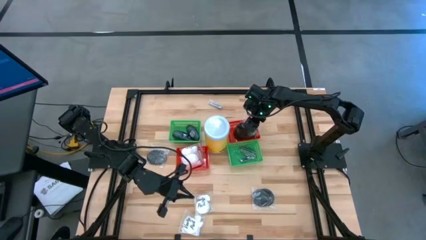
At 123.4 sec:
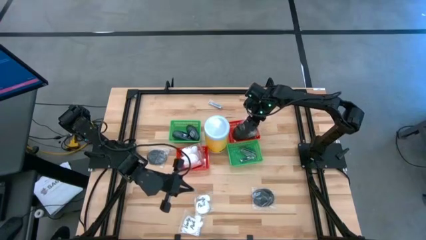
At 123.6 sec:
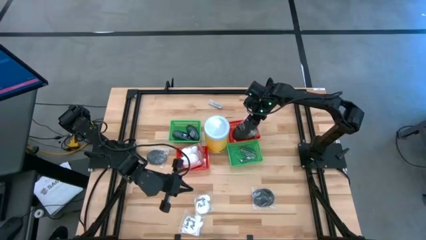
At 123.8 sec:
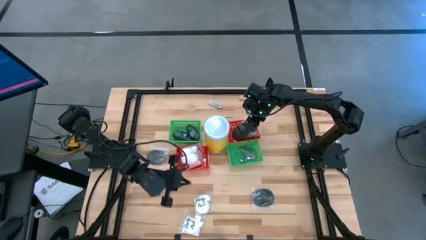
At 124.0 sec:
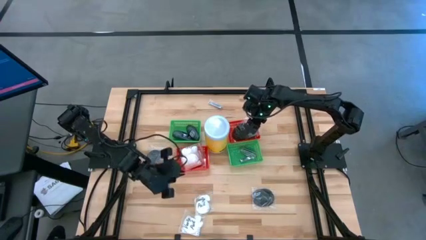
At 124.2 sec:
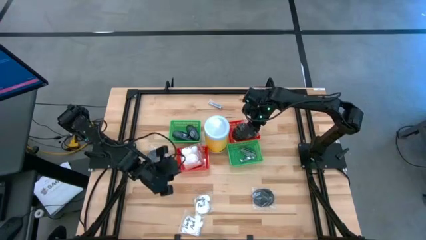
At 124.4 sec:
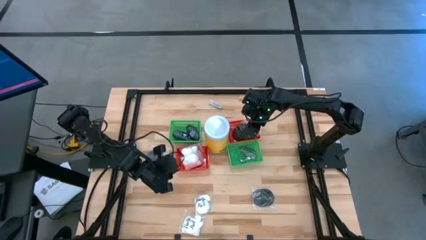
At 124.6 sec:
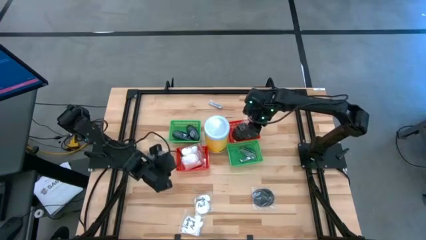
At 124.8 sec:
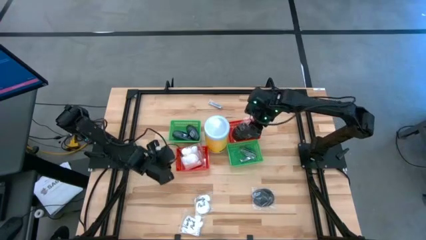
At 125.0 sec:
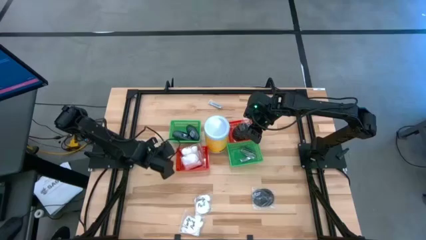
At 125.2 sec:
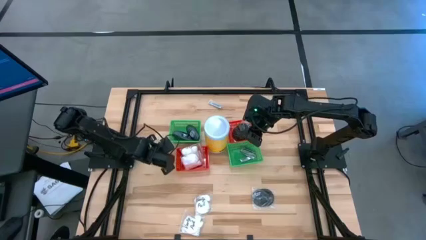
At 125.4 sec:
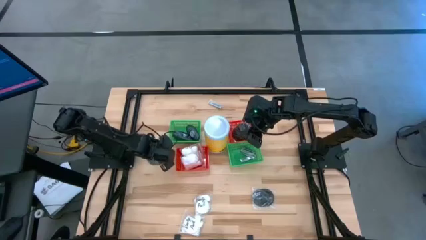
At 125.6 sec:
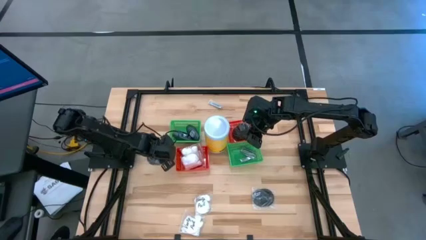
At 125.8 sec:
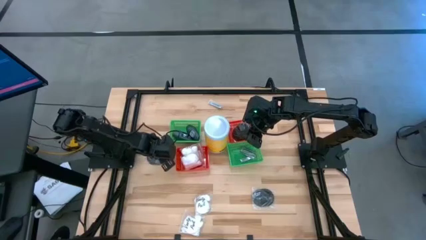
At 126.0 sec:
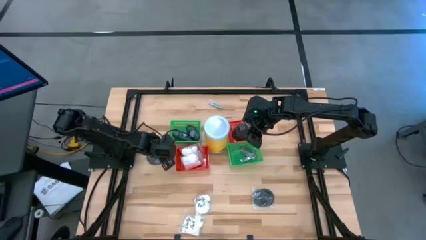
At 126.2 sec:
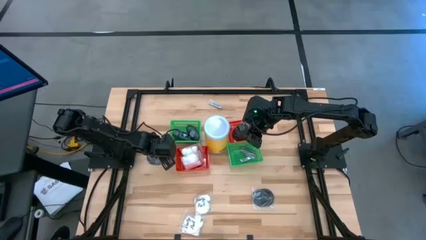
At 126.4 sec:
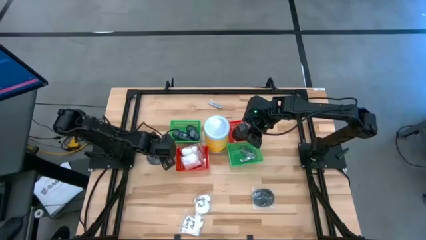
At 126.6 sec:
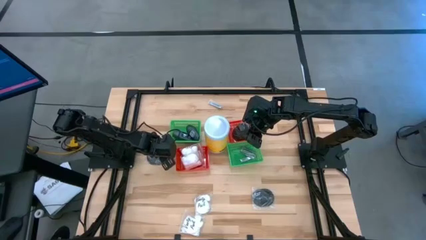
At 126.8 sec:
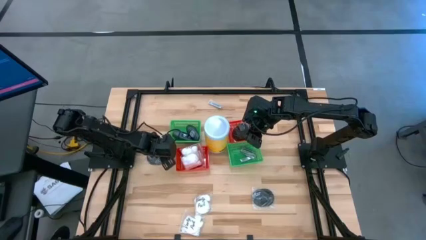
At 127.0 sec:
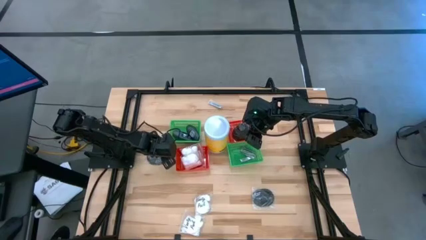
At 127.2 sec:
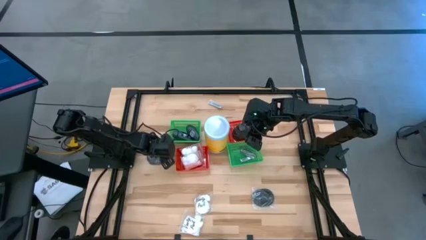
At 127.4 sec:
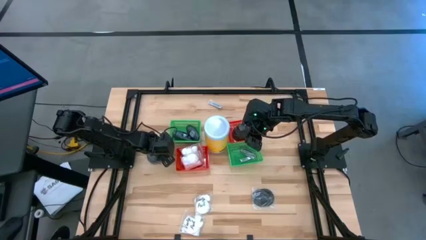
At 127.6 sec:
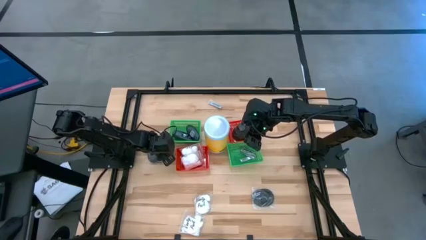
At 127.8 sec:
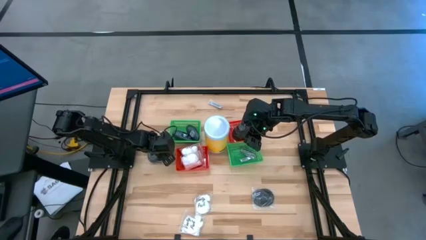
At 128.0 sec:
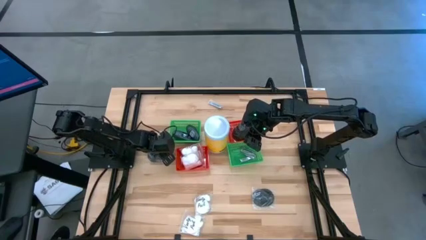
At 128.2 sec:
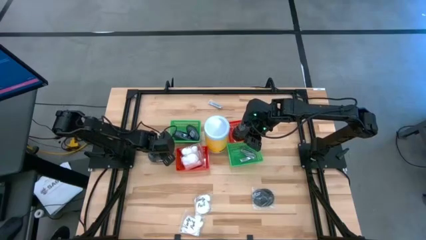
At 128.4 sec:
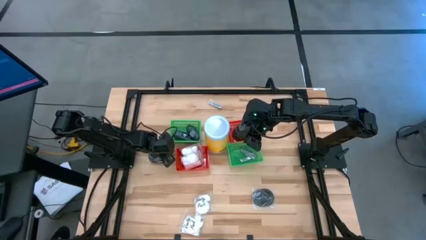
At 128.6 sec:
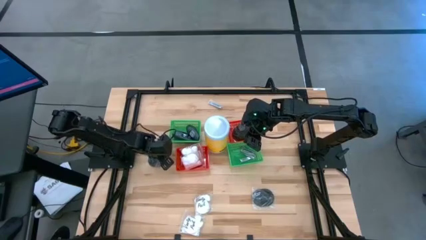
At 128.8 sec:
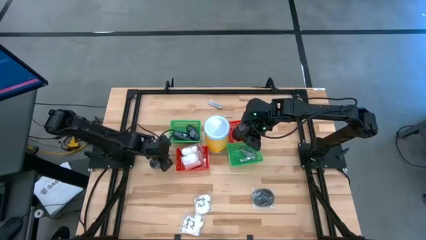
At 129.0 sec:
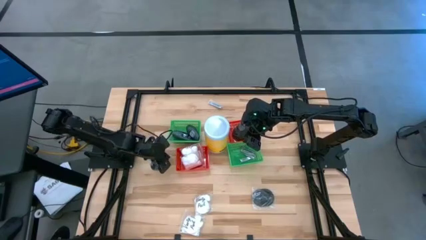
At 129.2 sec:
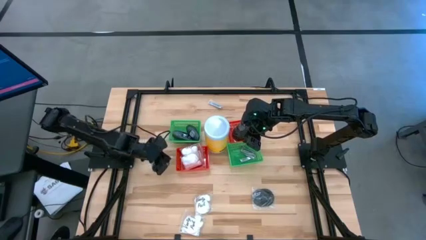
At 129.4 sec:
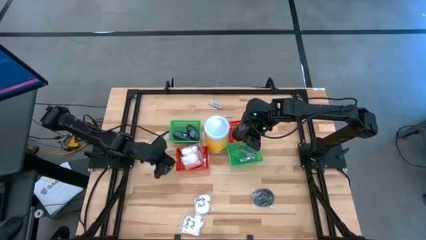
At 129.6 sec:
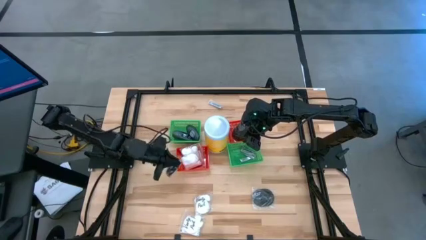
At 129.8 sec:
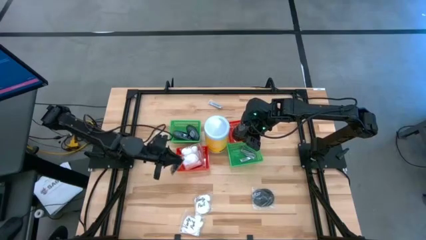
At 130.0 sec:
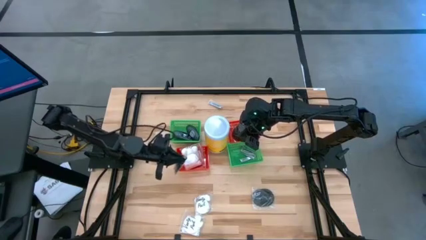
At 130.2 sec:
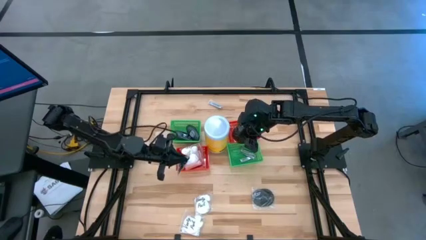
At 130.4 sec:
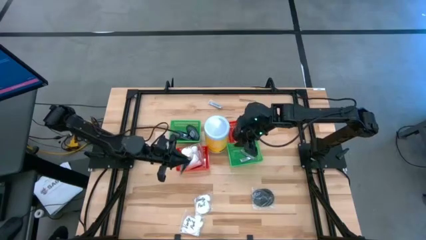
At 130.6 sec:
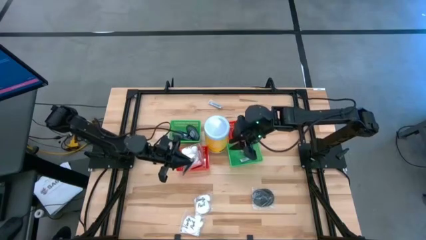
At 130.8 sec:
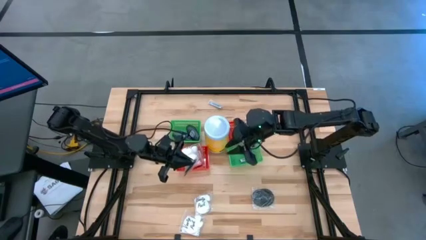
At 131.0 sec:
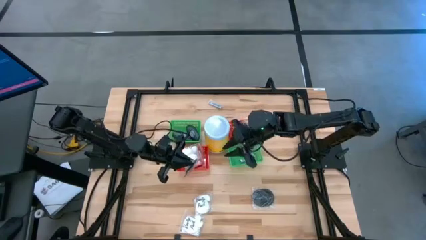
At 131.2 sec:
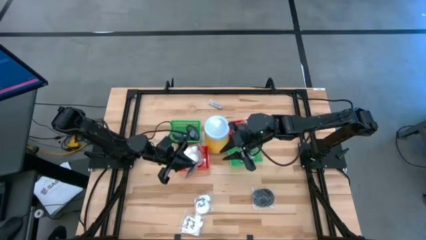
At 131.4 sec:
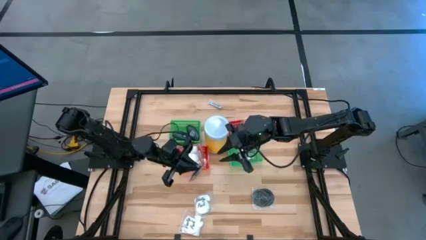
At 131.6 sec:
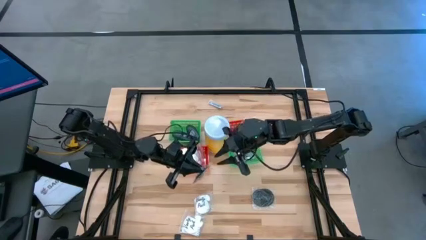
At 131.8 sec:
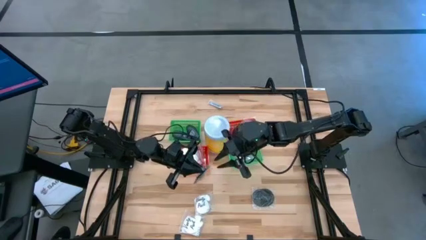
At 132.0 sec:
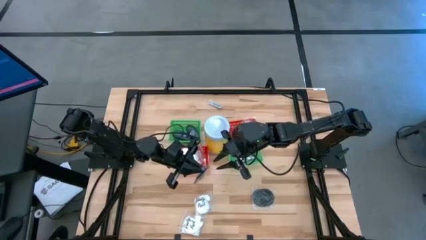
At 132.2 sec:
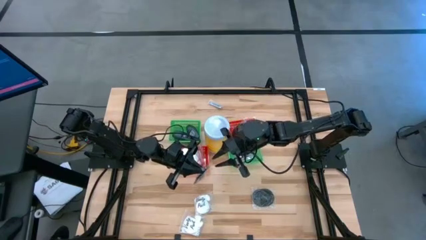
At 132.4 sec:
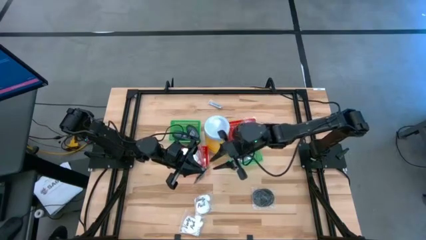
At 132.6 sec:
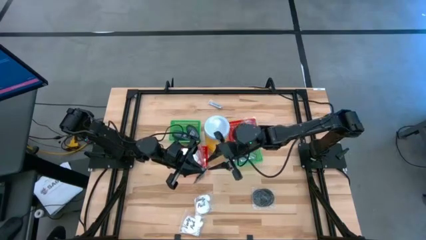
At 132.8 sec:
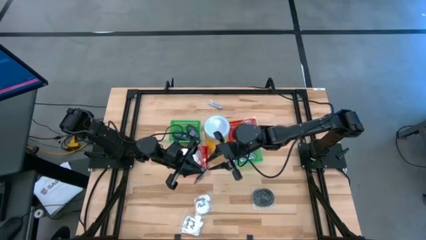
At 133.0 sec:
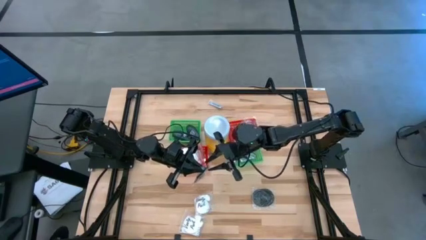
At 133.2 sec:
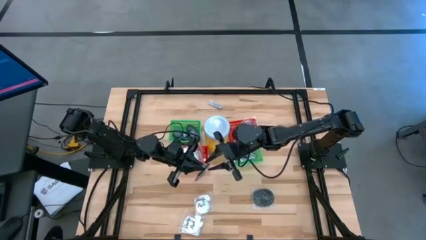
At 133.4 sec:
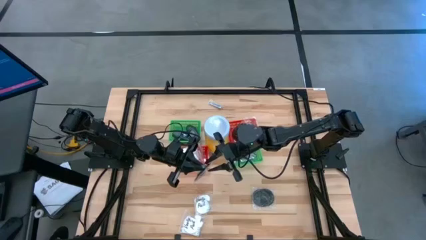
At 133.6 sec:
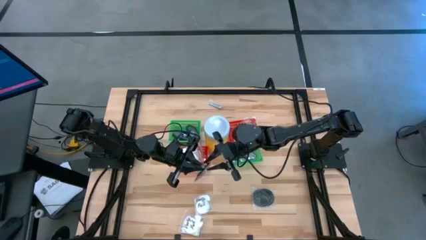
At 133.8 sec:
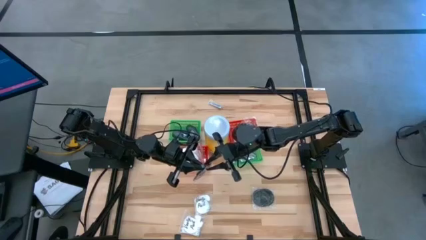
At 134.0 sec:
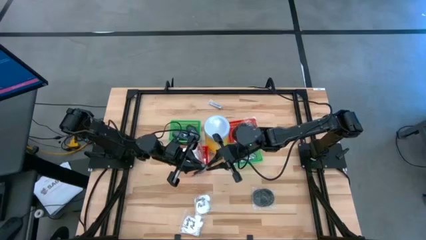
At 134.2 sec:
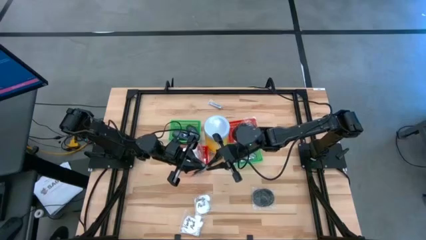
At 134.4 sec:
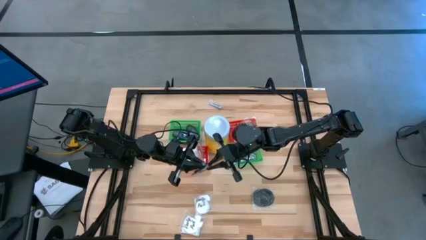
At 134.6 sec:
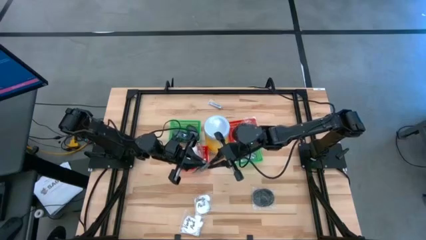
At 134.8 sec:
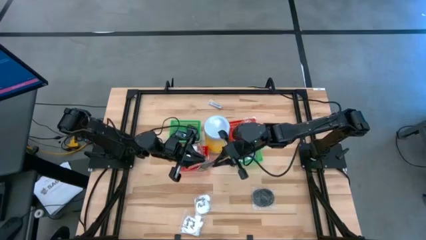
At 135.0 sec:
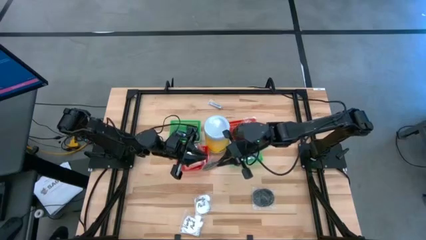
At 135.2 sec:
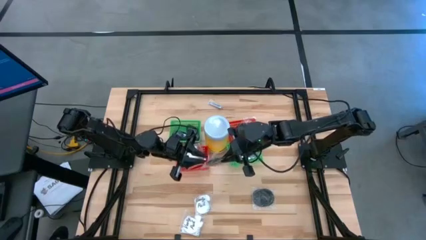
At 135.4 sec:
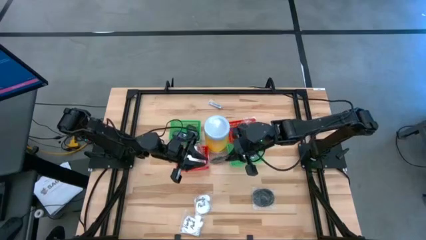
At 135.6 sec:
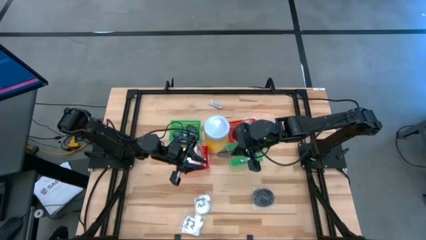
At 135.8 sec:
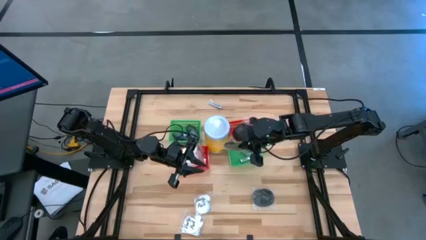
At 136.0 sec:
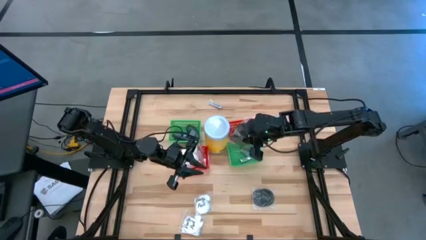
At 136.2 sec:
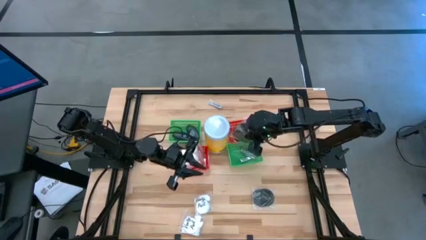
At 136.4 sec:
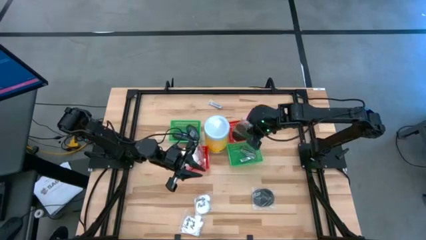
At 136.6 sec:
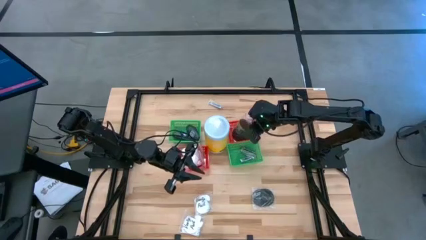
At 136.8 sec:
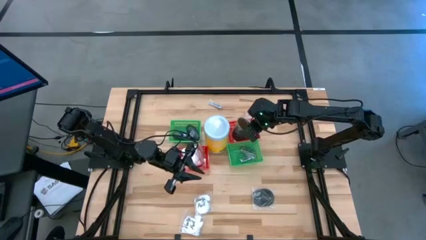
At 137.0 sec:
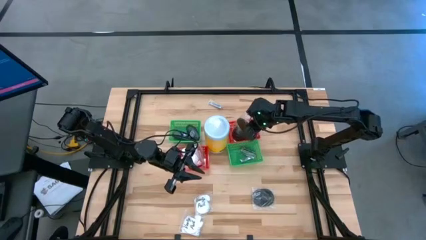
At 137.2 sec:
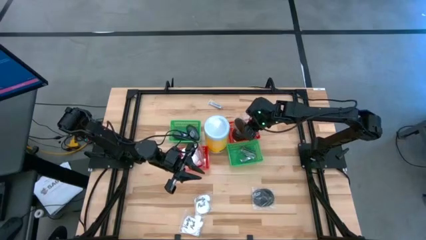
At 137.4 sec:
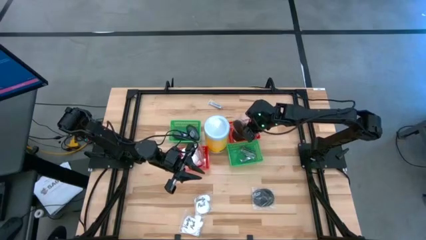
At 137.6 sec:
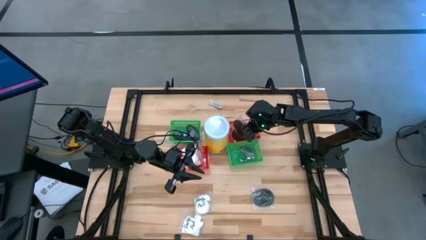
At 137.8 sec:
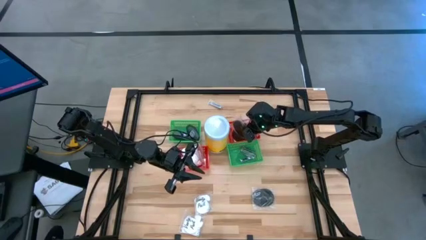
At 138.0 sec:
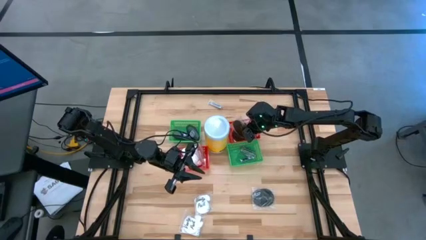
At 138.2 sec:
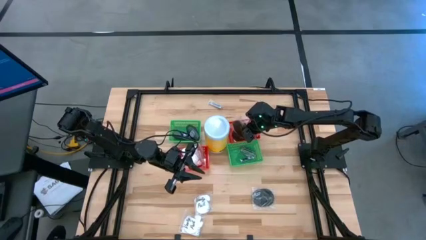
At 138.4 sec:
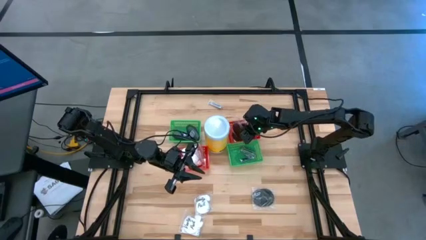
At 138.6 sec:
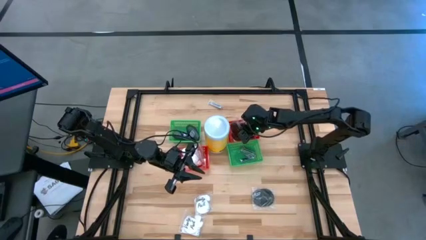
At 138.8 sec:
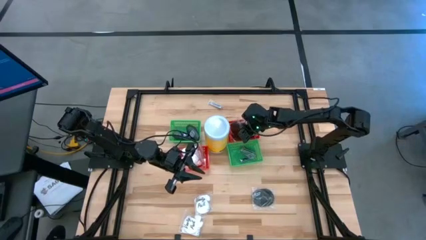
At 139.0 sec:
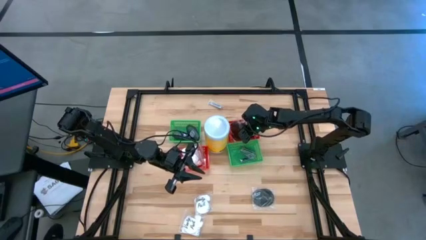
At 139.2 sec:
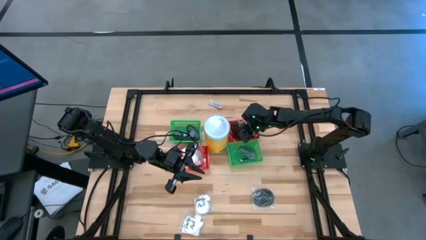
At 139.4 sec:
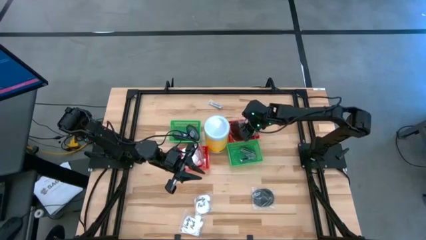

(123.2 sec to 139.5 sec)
Task: Pick & Place Travel size toiletries
Put the black hair brush into the right red bin
